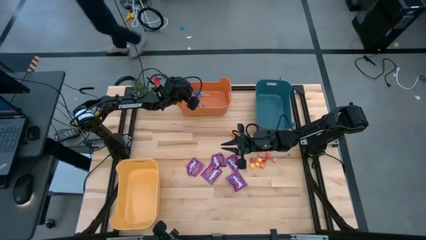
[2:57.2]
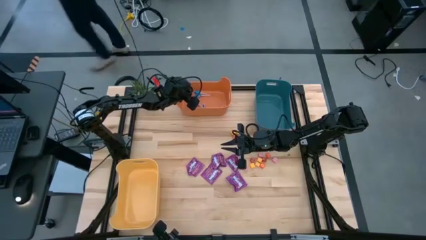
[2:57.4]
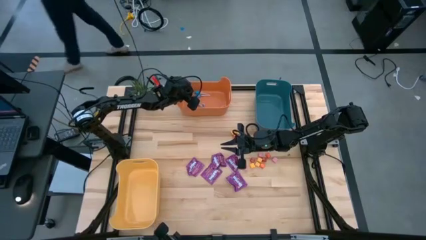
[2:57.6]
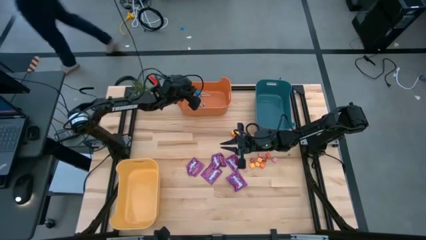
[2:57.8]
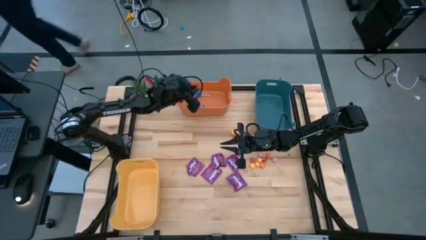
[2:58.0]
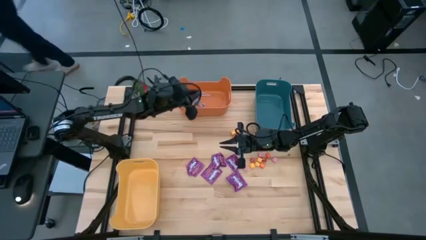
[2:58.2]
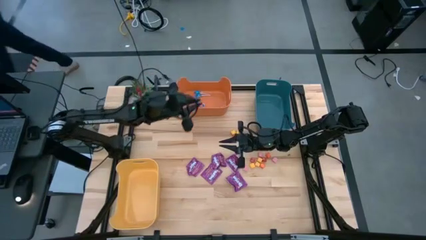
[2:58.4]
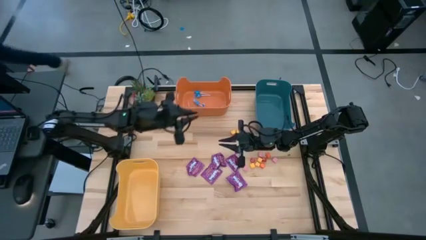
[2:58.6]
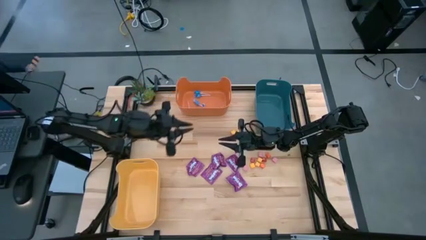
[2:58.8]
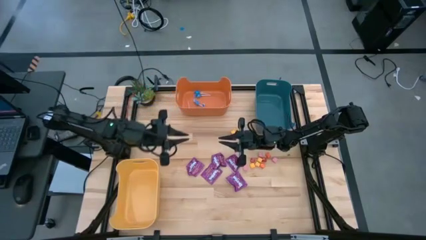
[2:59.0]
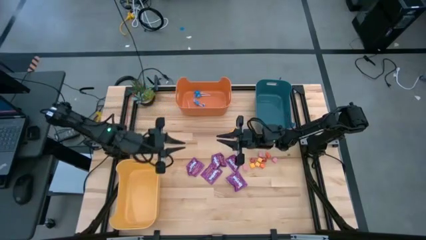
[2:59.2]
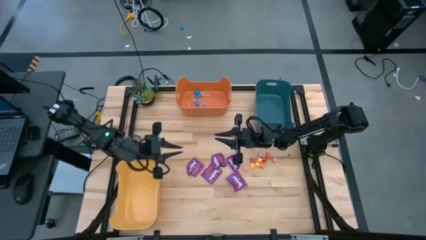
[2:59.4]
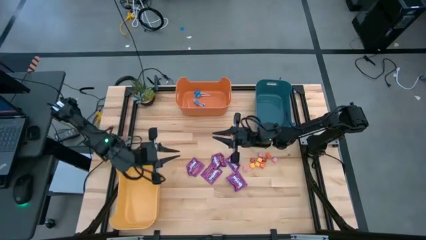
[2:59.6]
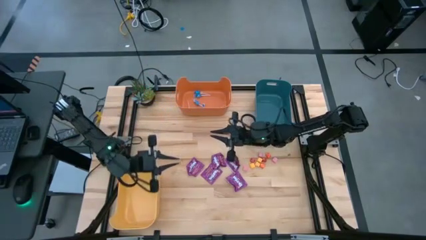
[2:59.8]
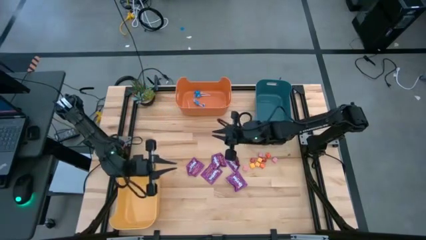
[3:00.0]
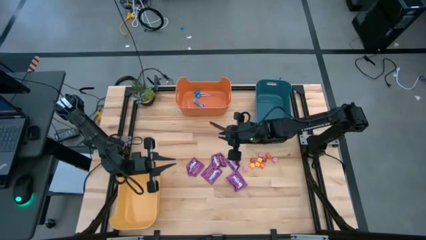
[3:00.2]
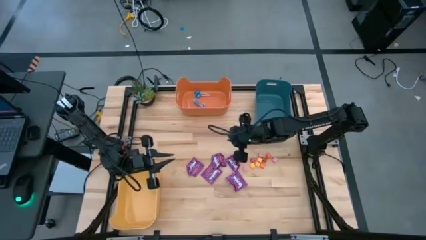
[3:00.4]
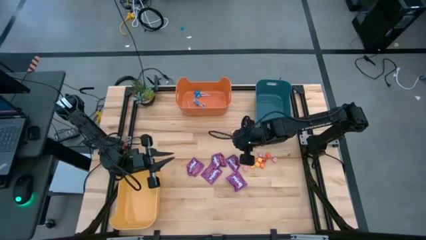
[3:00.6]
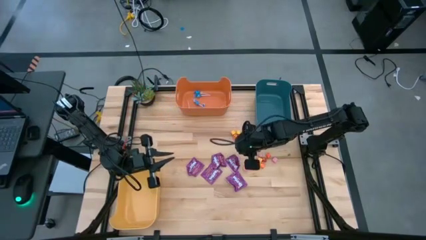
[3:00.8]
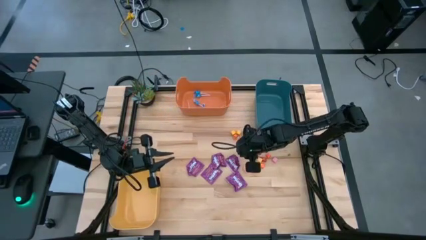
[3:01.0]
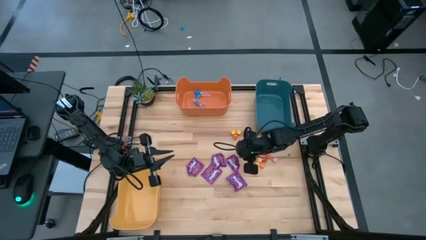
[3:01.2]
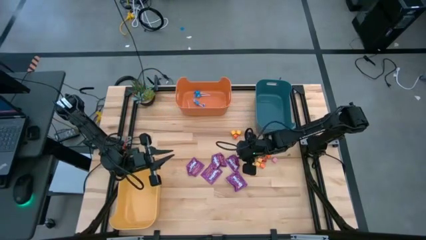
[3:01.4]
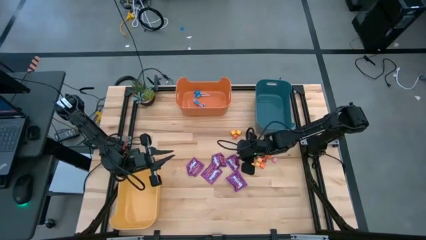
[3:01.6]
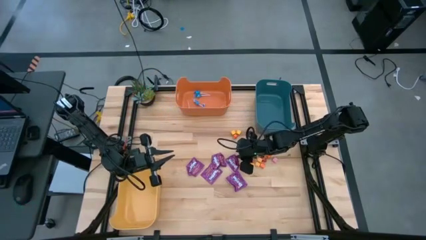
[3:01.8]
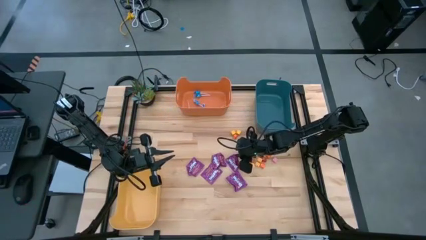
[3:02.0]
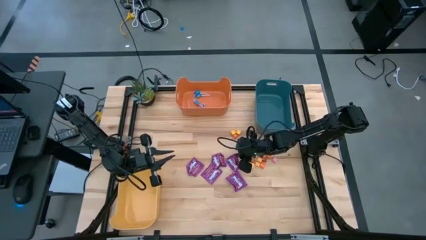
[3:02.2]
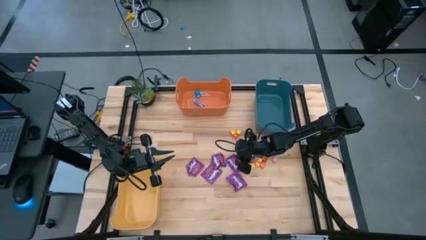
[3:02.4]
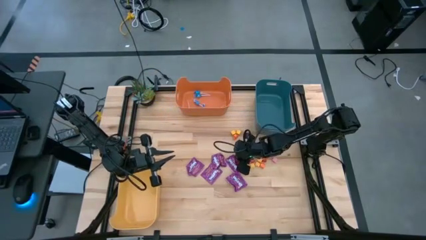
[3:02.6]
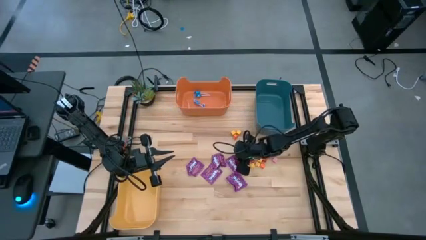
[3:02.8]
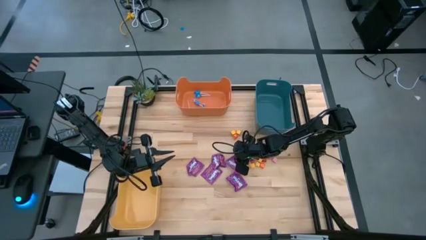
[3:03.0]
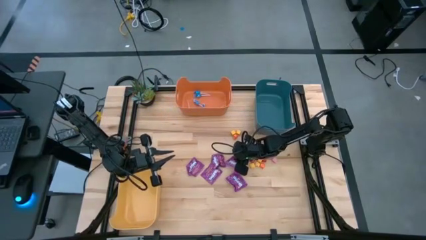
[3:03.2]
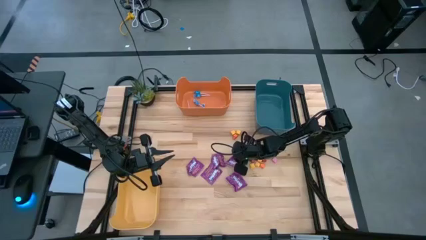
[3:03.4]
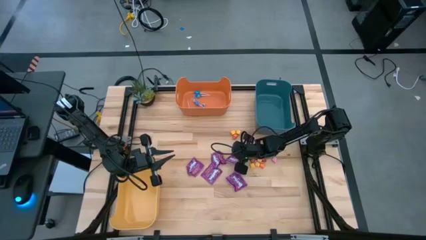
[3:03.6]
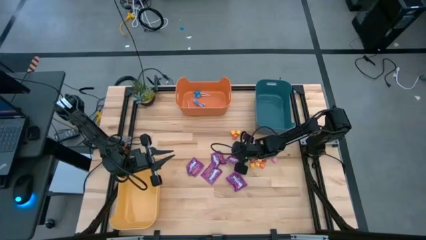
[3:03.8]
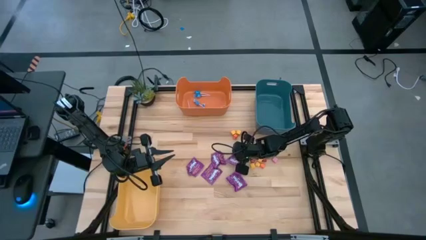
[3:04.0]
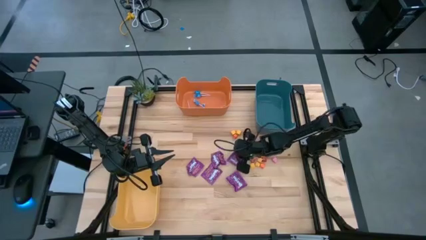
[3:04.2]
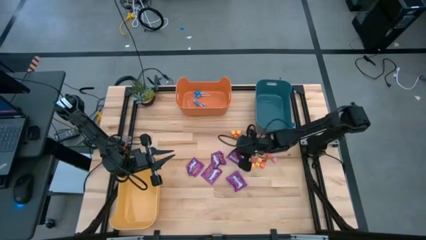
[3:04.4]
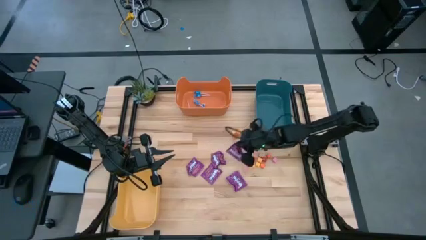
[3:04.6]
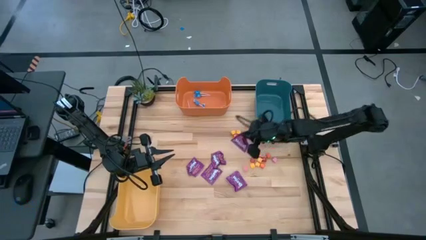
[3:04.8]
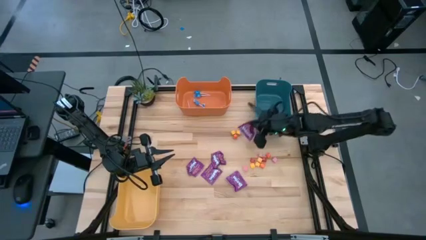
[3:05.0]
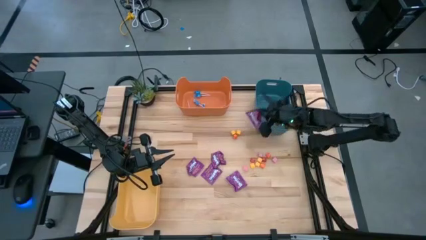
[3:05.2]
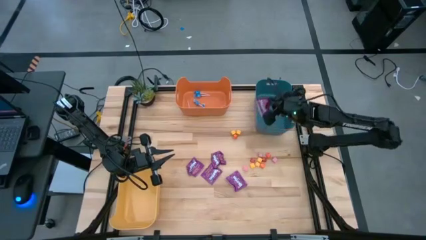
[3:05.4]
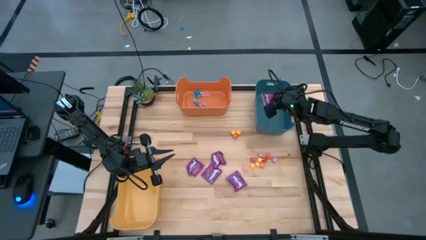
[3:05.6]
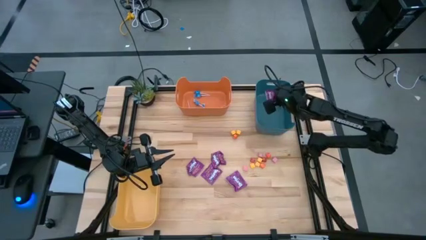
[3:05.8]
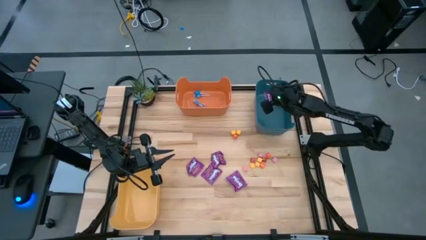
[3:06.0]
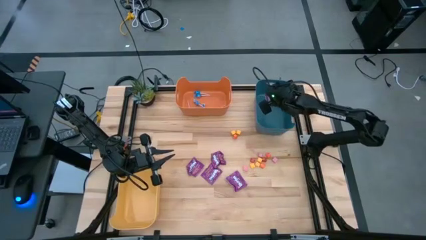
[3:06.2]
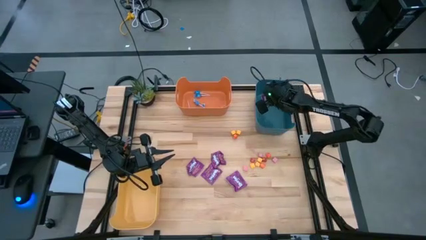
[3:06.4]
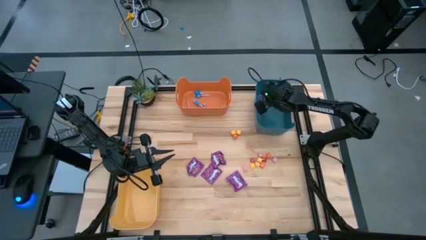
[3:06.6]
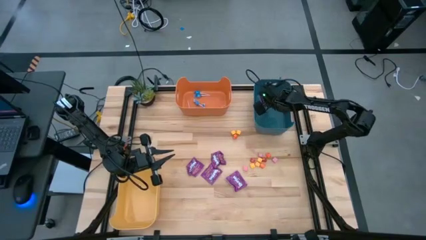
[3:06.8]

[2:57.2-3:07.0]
Task: Sort candy
Put the top right purple candy into the blue bin

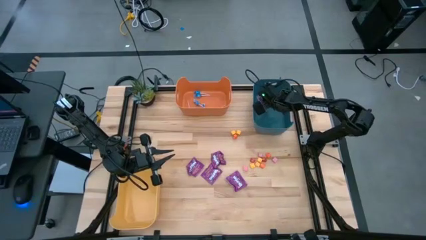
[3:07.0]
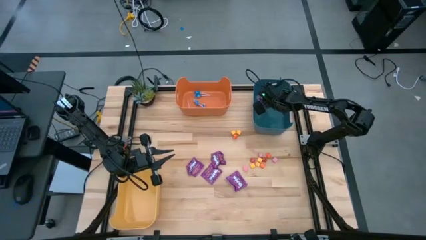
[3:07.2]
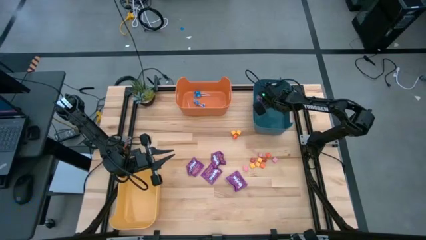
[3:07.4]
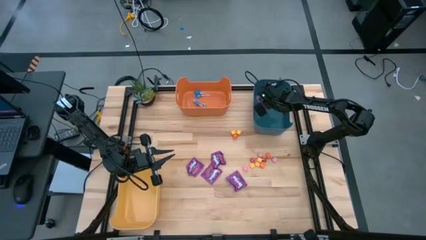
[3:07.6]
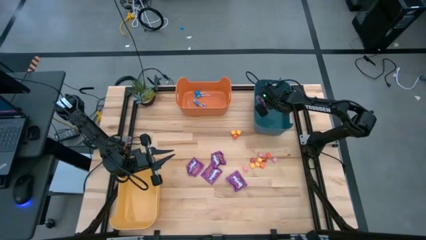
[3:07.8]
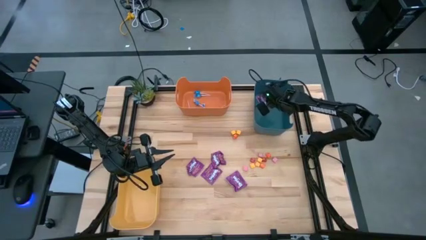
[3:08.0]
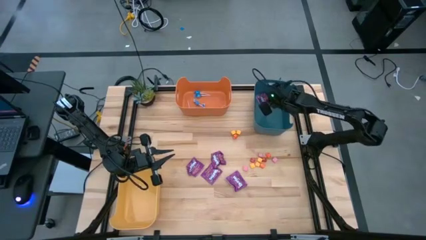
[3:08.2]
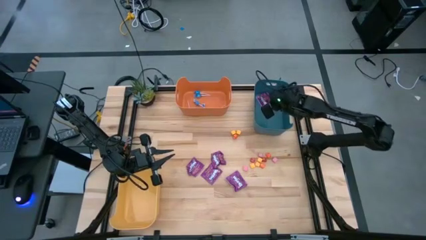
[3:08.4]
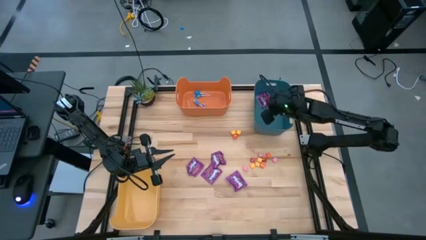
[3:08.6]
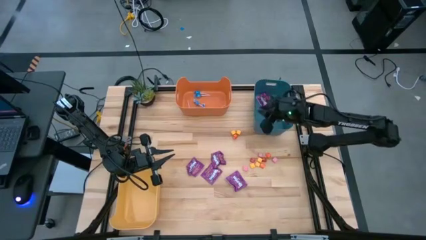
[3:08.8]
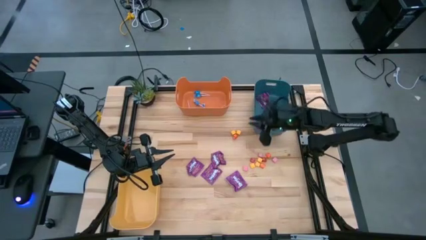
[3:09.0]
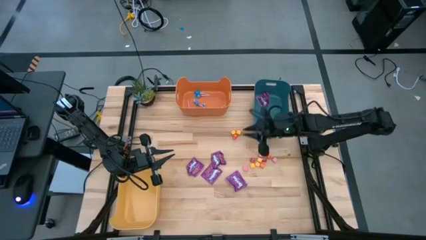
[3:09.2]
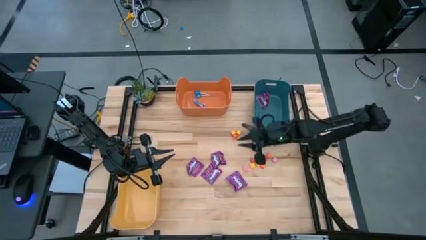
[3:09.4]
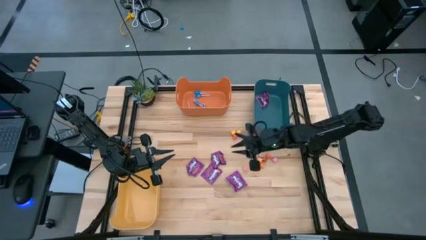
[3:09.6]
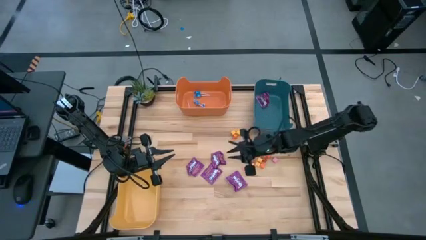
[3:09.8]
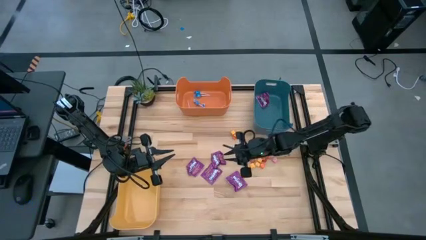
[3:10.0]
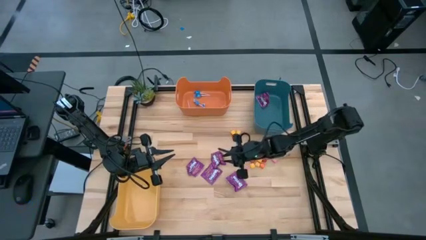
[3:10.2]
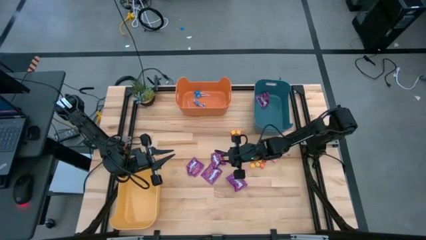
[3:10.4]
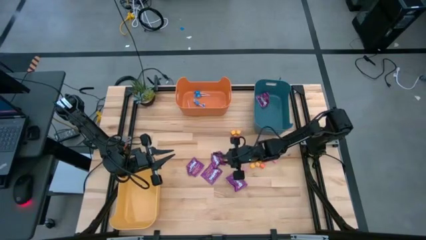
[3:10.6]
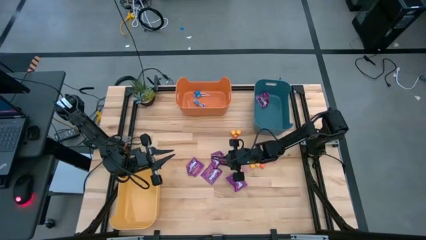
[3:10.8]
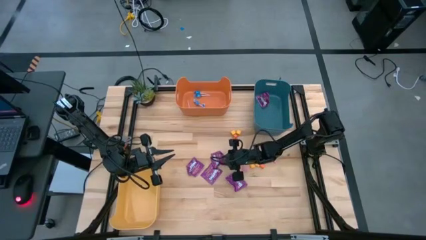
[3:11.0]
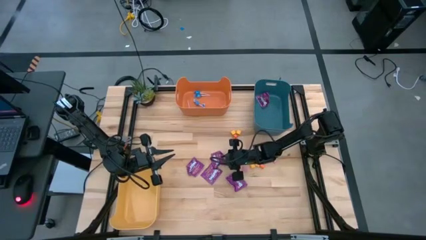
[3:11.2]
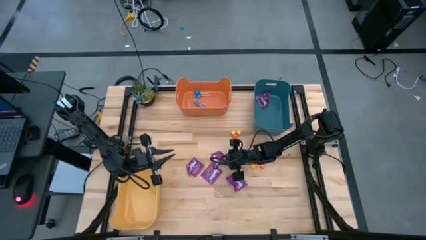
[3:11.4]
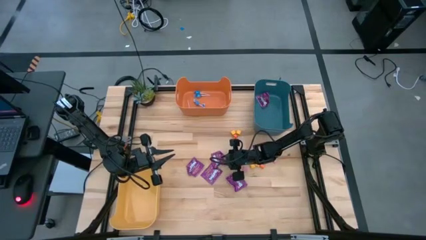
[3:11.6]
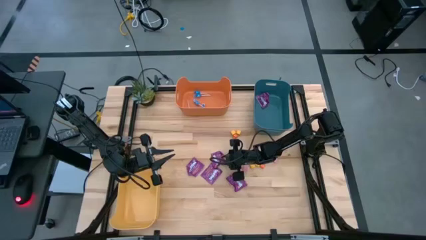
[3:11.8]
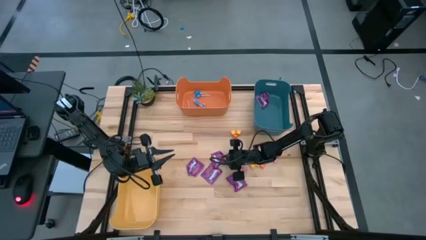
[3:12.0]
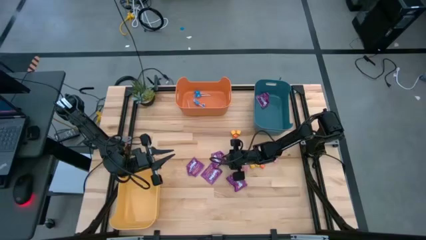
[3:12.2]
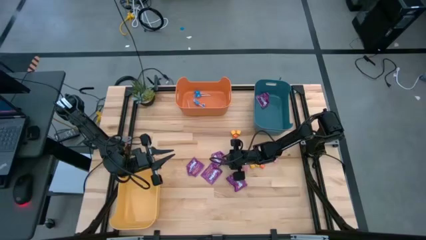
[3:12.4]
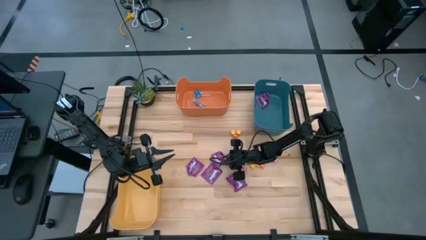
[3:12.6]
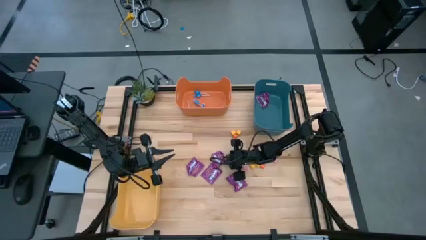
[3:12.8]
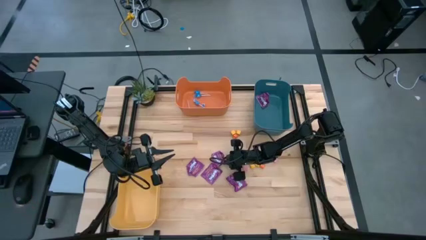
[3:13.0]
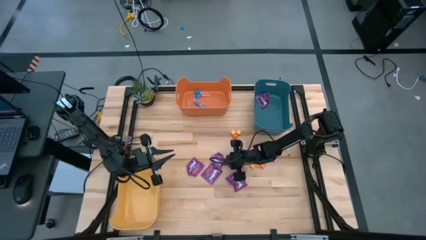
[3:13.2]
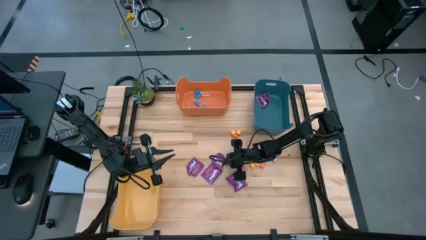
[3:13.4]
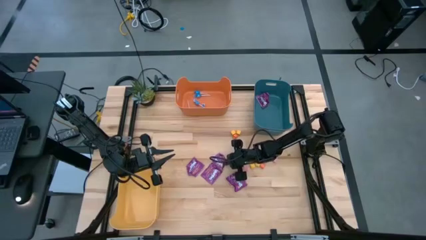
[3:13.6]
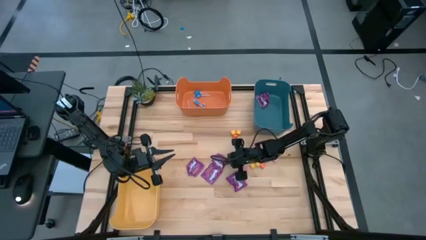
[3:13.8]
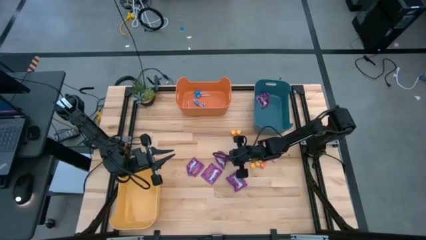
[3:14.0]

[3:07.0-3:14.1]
Put the top purple candy into the blue bin

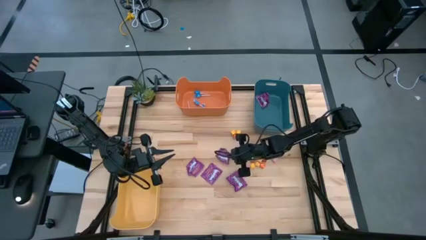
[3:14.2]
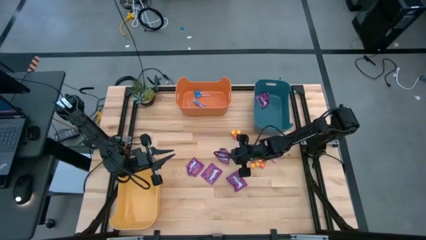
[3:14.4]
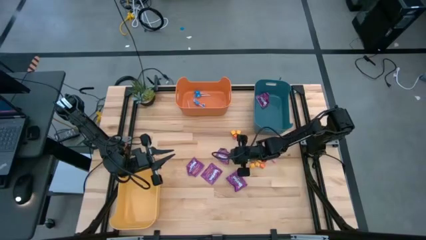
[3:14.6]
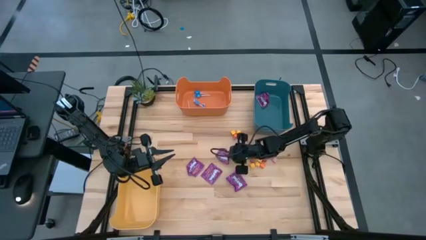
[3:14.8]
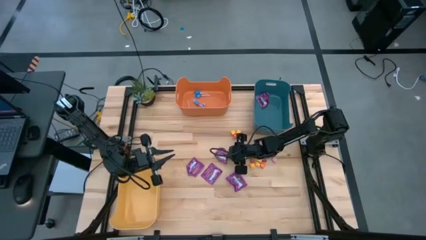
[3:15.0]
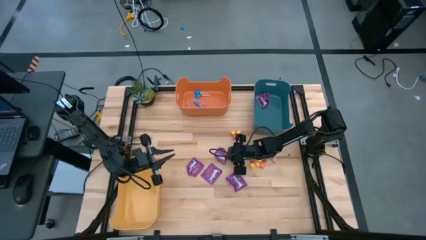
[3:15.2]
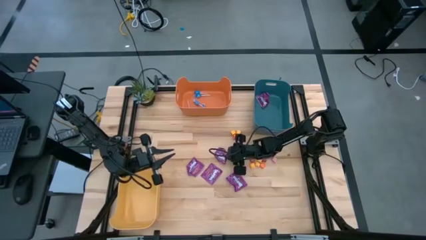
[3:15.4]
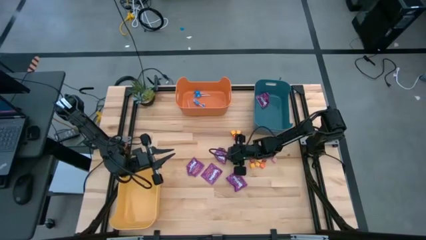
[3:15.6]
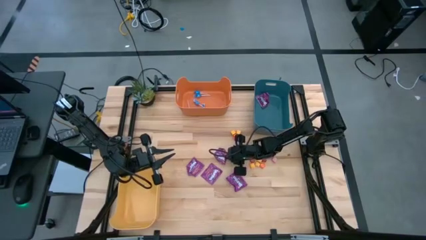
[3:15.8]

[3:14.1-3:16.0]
Put the top purple candy into the blue bin
